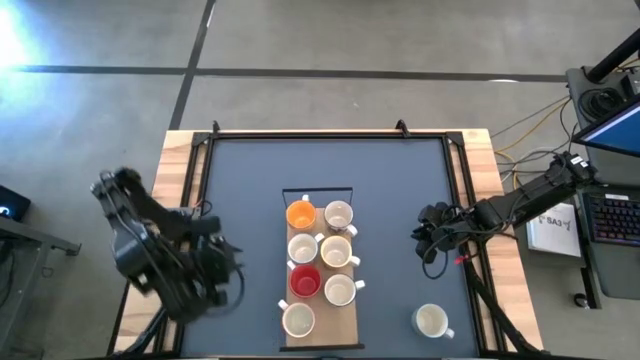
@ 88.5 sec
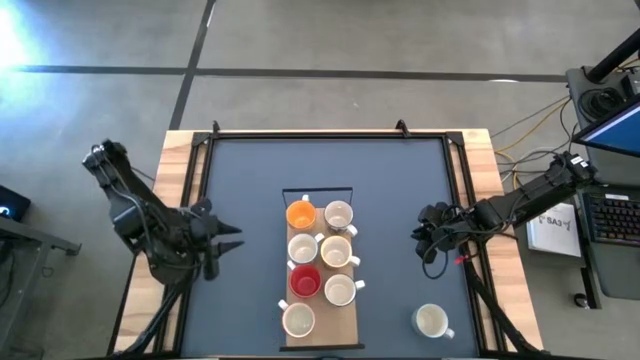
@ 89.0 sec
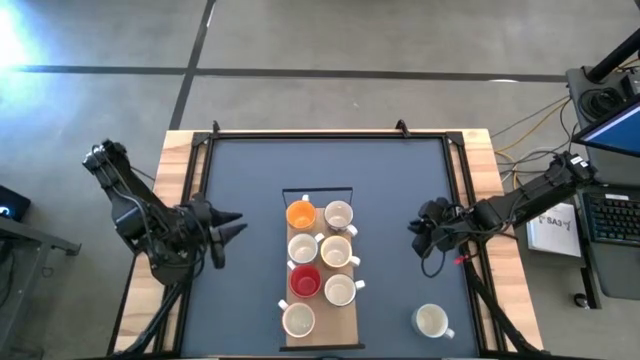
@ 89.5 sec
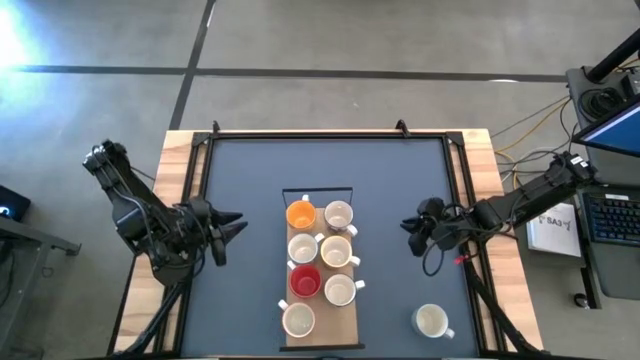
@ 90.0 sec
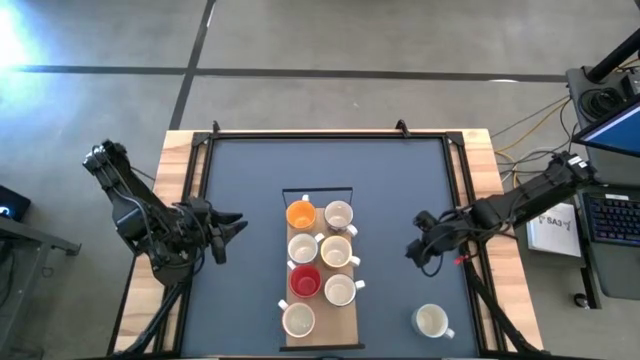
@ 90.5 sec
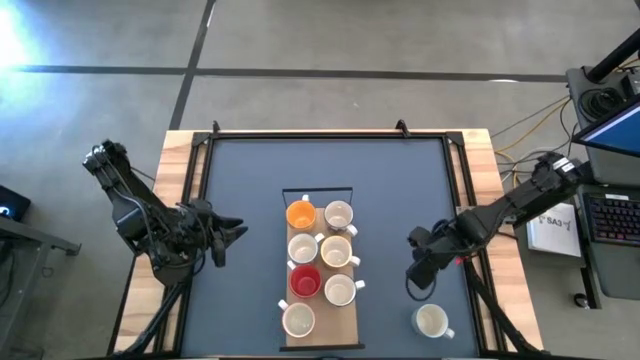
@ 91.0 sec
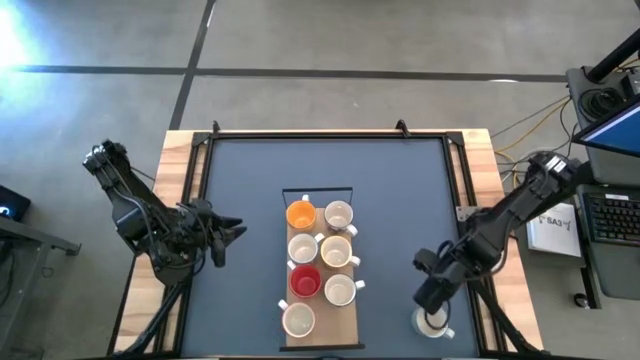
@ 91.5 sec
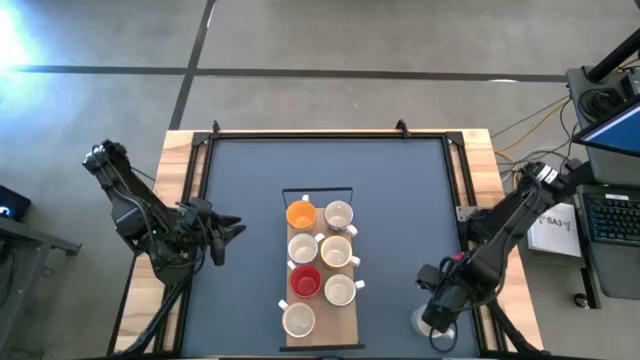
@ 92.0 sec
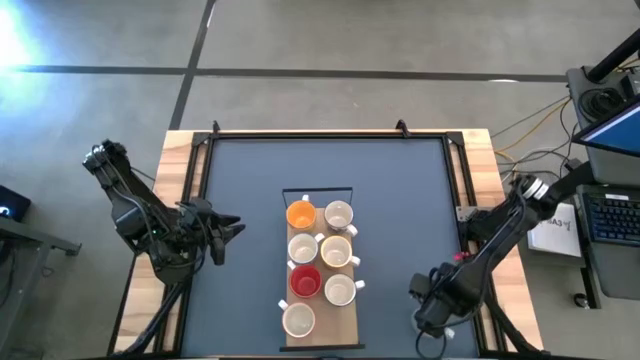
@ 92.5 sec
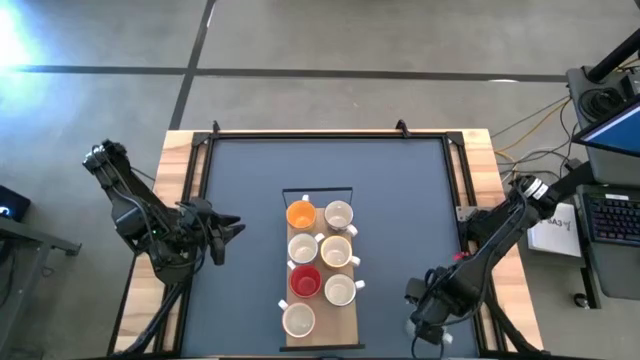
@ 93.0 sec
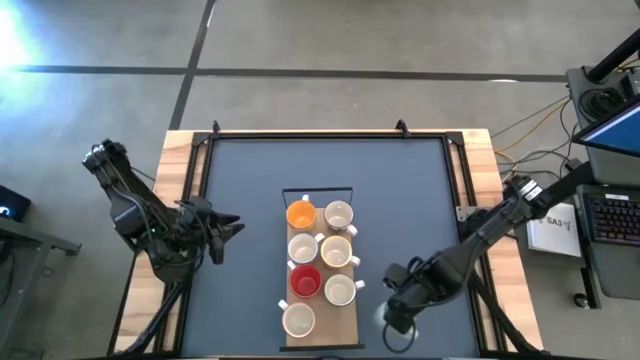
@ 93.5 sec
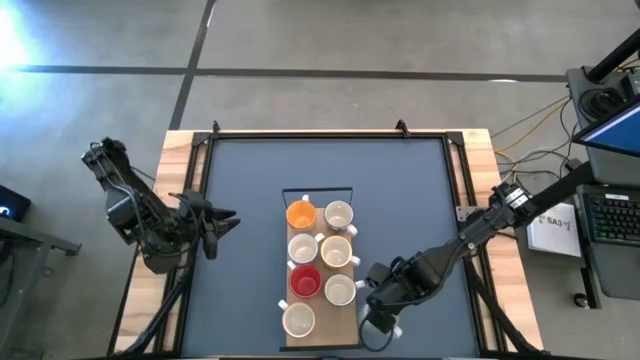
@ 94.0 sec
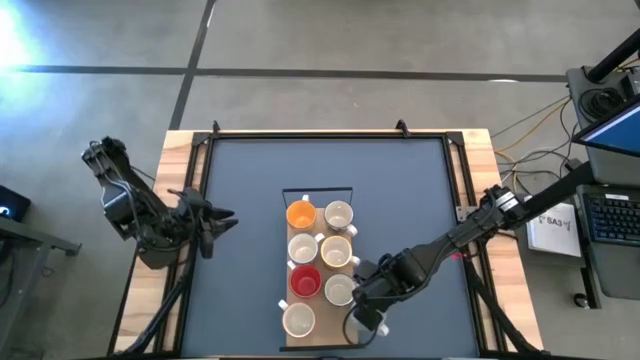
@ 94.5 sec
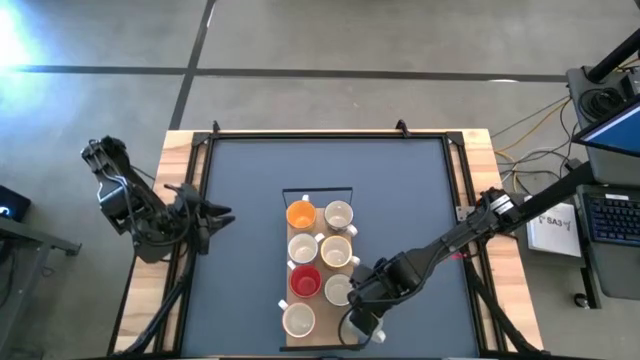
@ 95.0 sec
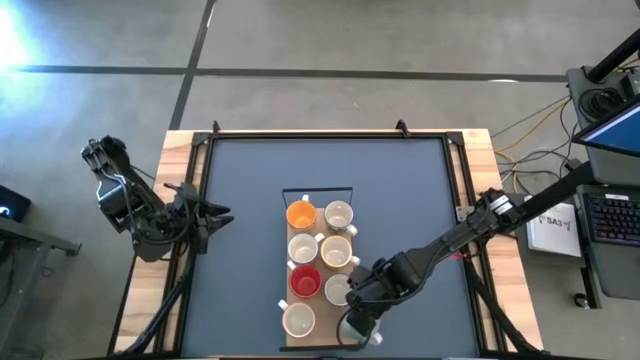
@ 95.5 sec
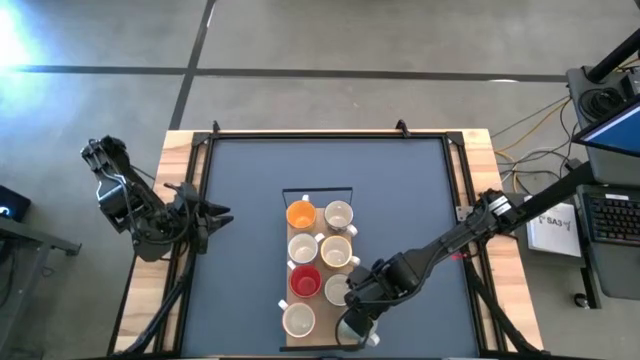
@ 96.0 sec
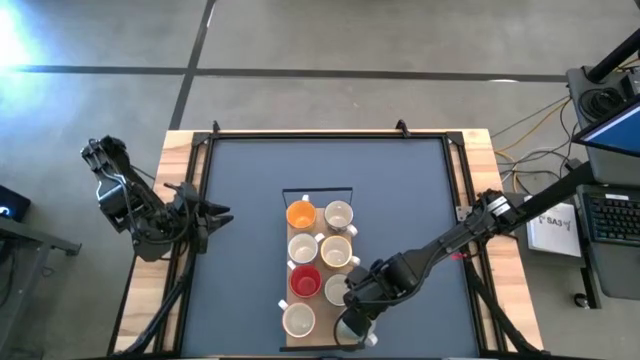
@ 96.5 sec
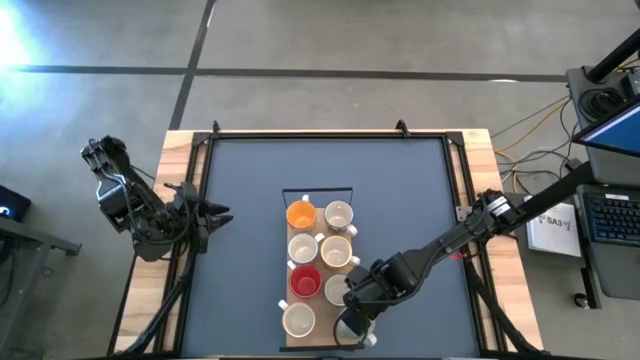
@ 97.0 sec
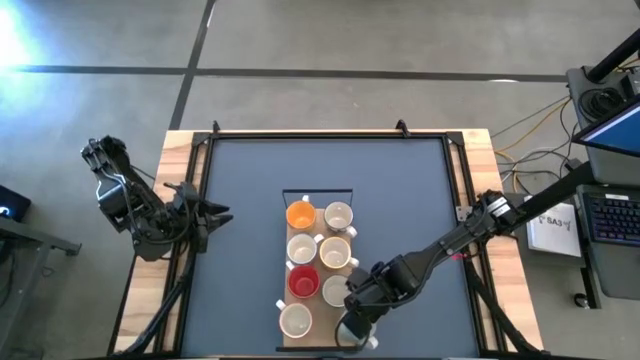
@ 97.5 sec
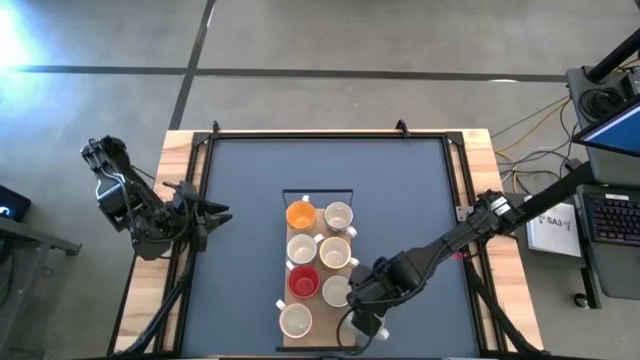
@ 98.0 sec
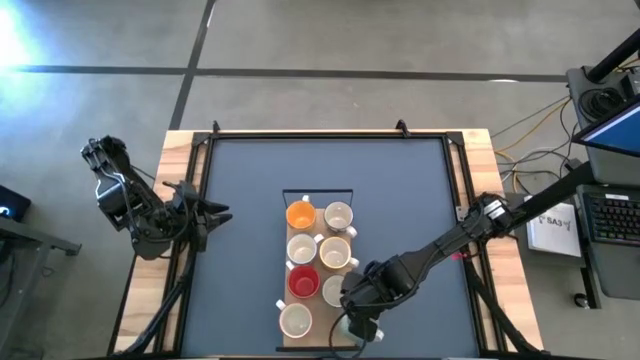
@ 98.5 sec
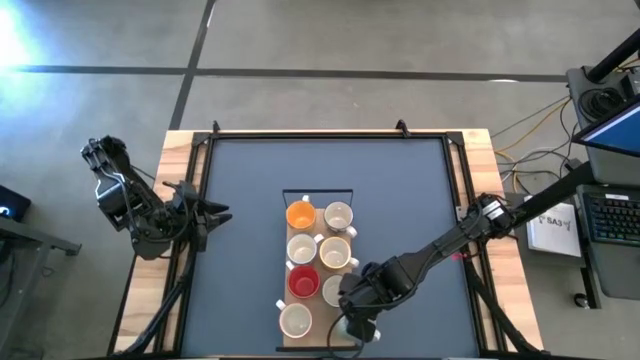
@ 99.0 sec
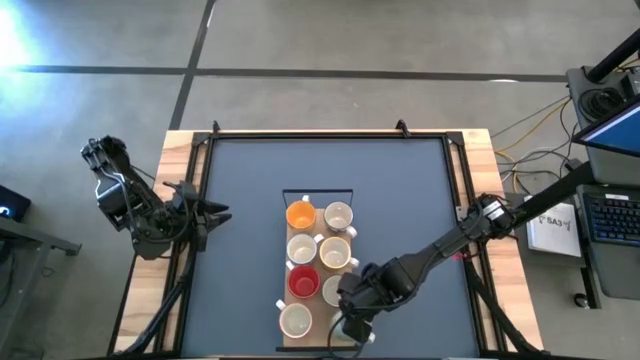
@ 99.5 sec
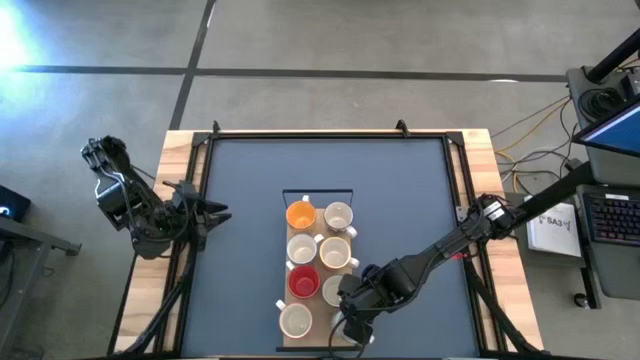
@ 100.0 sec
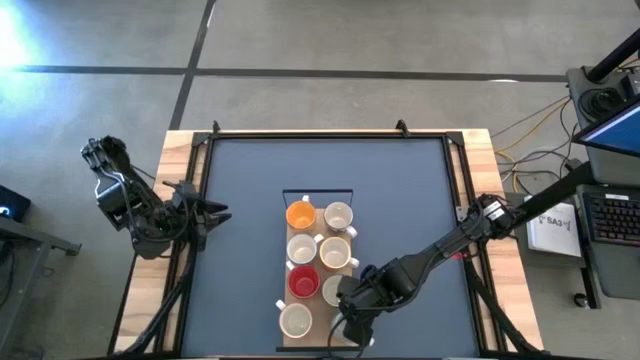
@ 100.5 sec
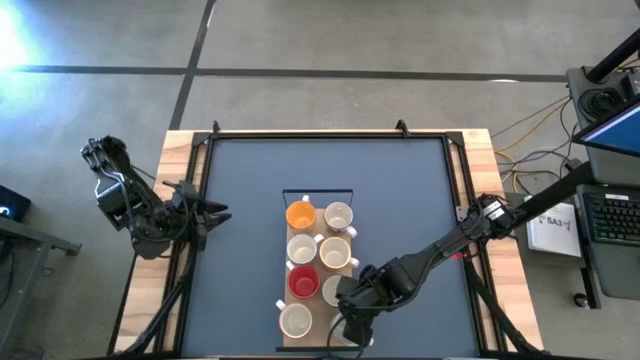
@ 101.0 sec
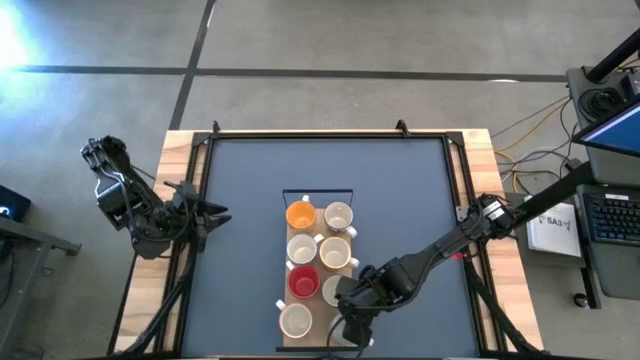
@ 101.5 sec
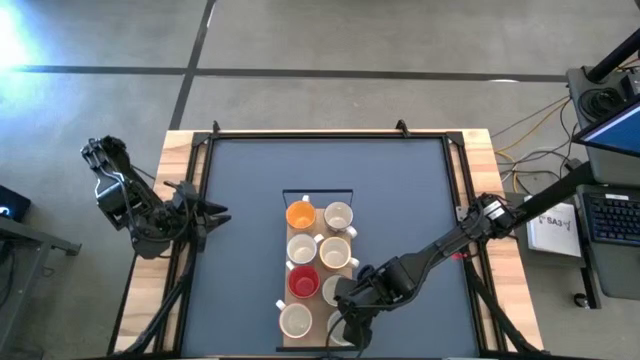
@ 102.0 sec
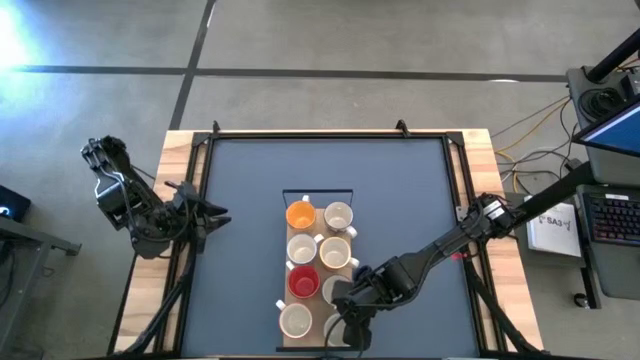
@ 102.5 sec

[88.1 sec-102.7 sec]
Task: Place coffee mugs
Put the light blue mug on the shelf
